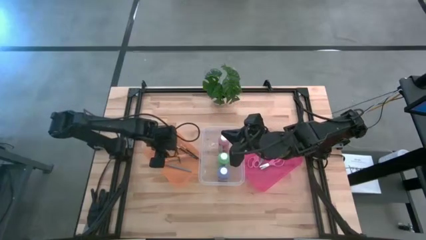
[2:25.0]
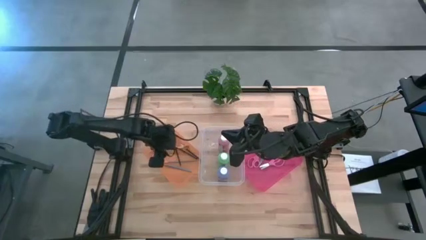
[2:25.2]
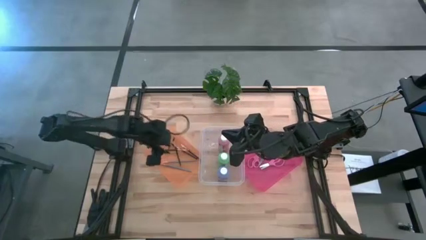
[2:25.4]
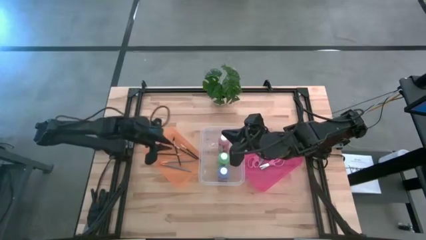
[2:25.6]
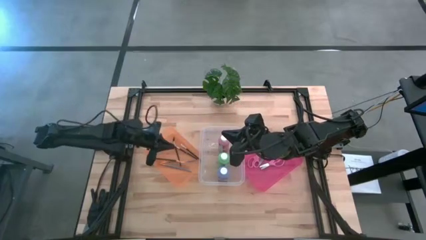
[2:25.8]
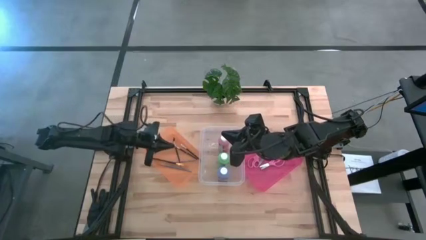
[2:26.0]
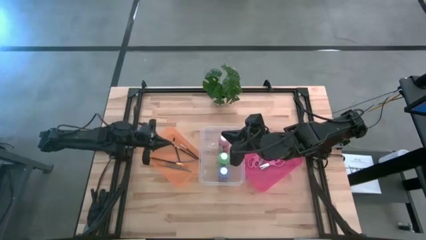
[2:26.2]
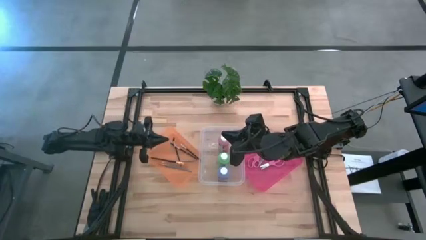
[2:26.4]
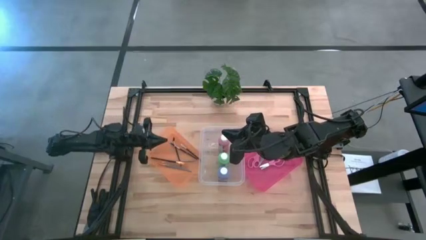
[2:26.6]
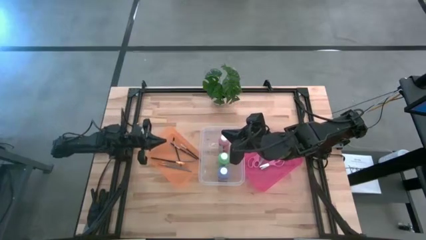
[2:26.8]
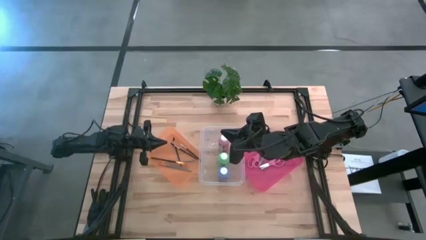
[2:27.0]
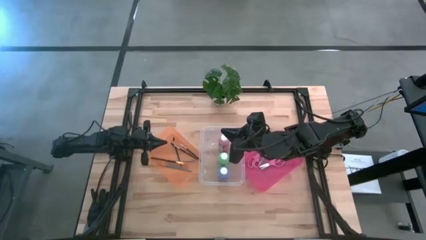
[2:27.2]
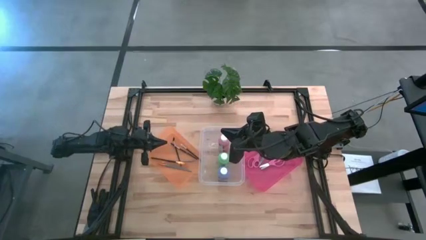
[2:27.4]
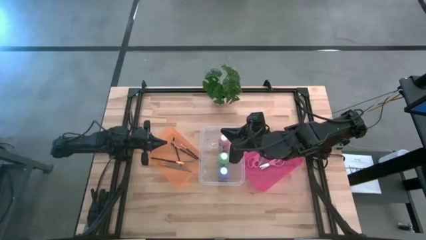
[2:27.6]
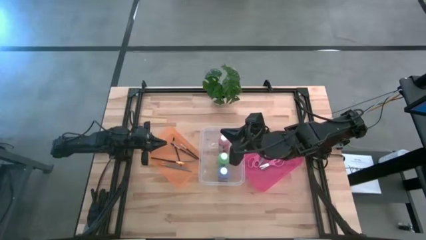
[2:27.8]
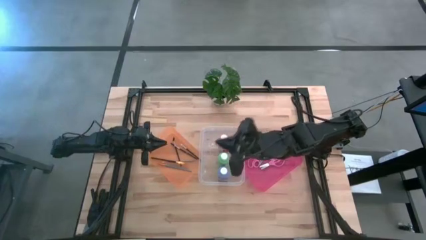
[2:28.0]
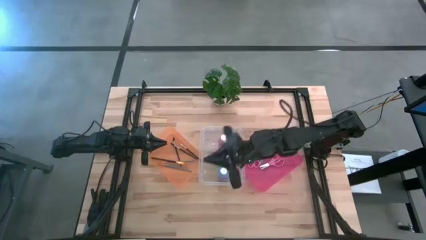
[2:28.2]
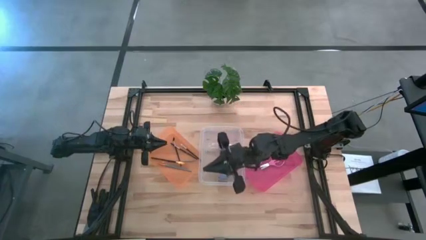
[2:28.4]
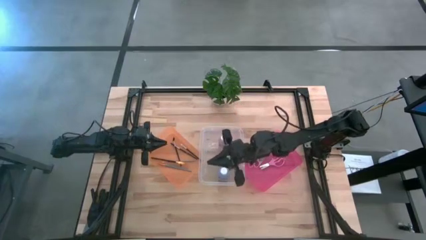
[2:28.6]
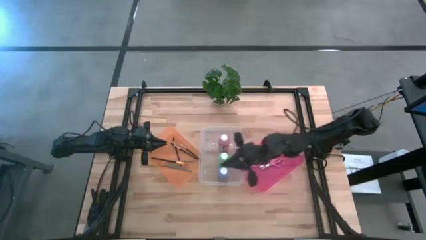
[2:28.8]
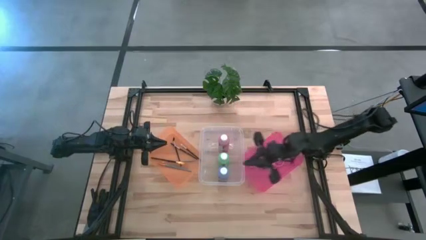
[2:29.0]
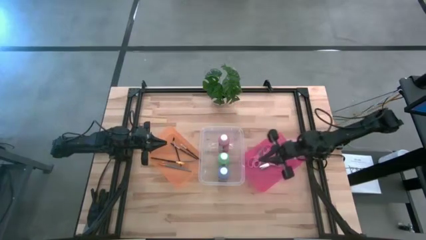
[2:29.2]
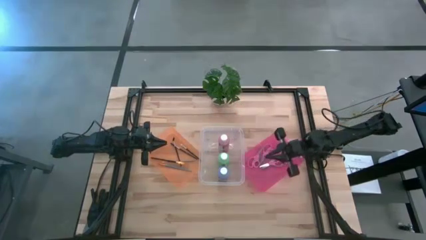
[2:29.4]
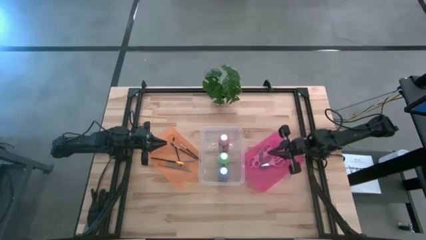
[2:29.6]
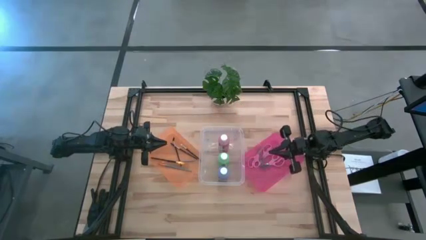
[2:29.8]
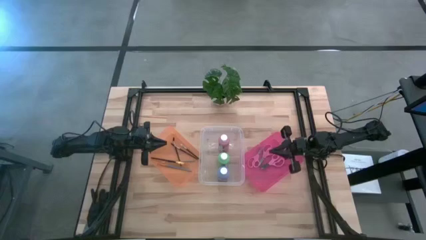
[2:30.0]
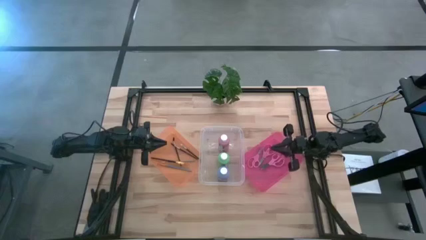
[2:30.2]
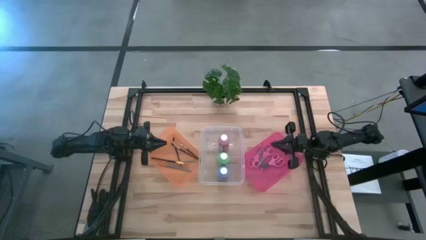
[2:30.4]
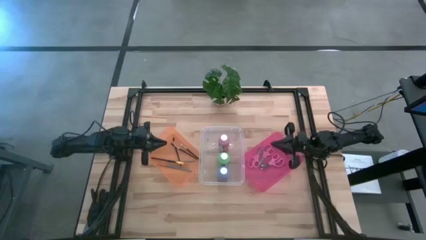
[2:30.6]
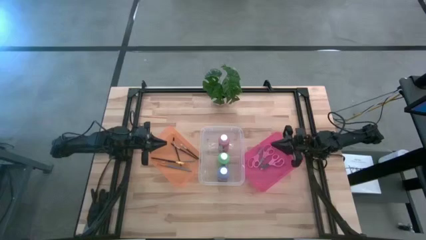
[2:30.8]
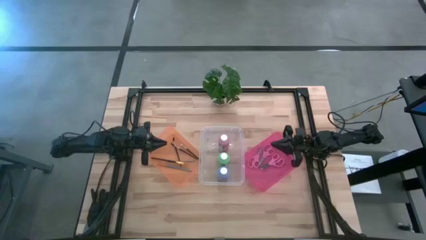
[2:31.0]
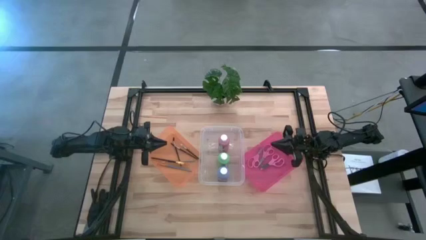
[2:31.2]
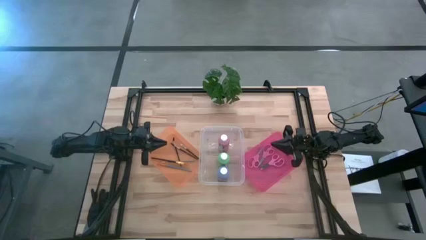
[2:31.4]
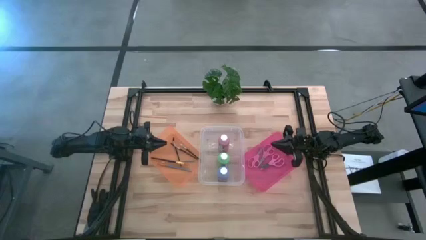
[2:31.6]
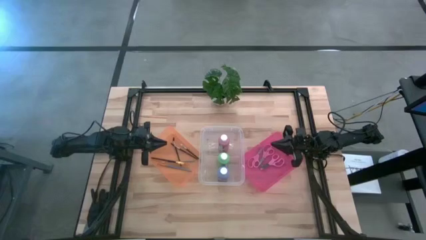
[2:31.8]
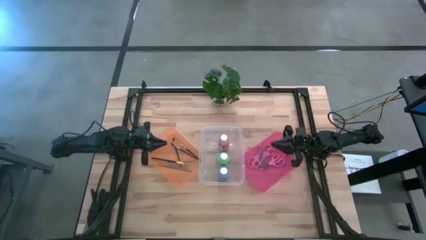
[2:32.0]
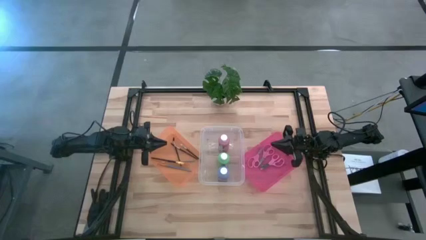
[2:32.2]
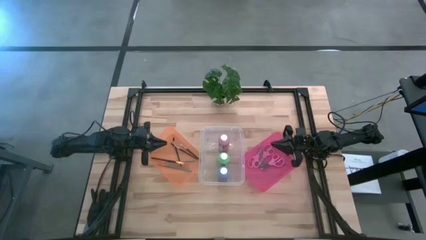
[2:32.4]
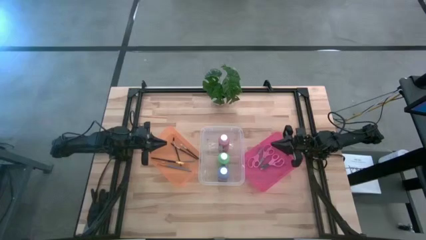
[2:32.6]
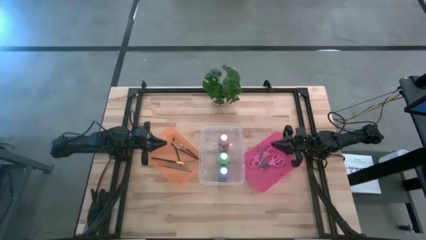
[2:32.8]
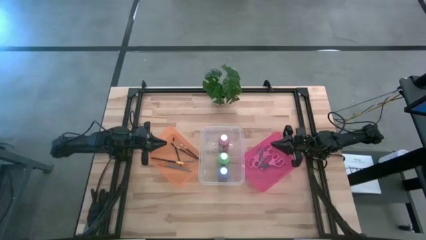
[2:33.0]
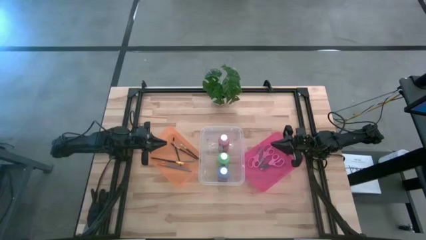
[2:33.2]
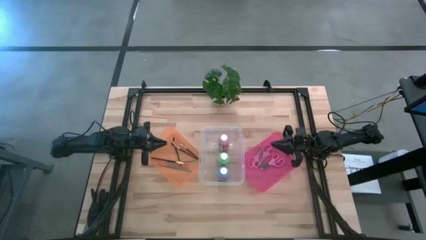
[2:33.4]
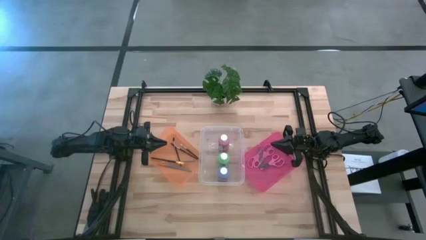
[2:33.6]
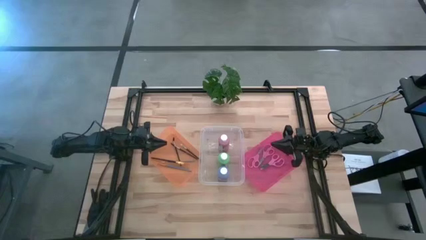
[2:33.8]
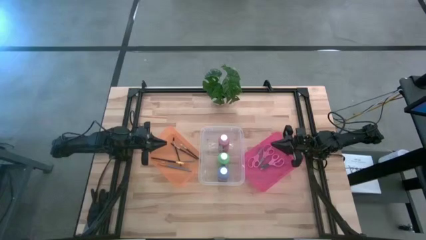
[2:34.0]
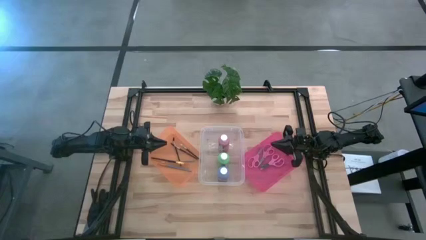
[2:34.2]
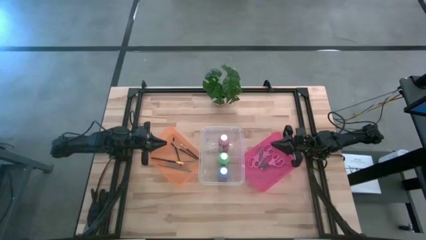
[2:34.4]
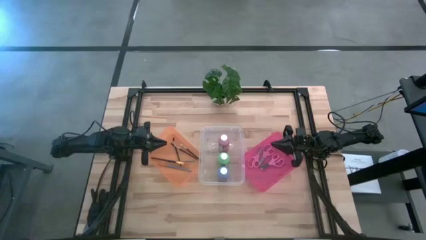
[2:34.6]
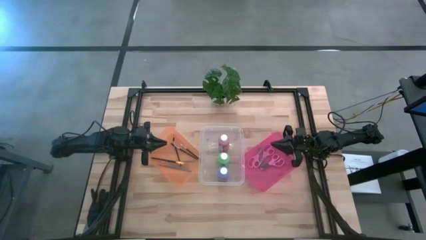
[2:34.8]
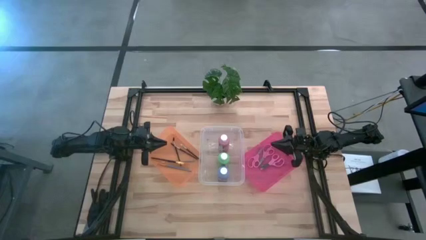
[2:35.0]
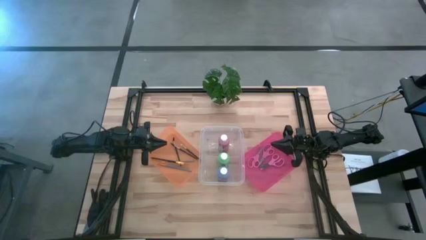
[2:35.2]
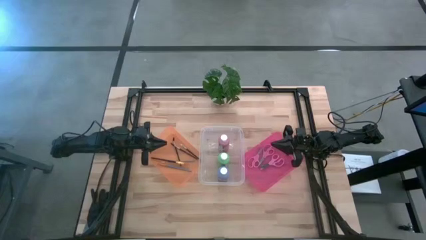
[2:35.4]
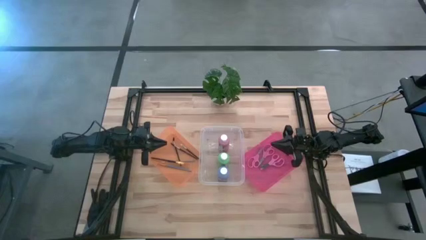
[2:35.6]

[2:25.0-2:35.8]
Task: Pick & Place Paint Supplies
Return to Home Position

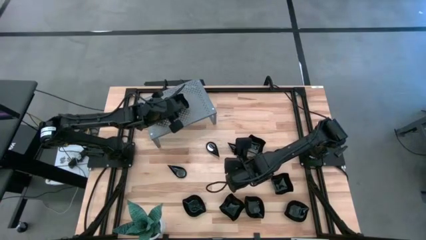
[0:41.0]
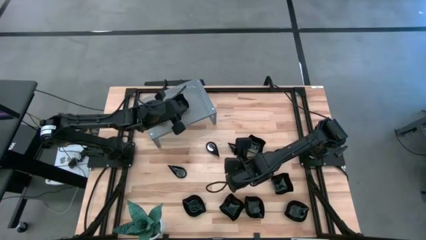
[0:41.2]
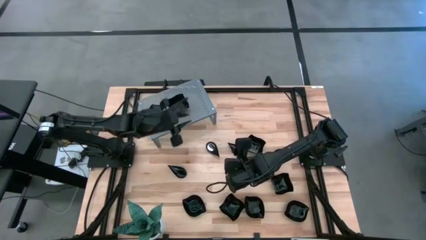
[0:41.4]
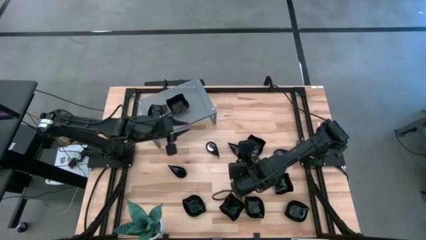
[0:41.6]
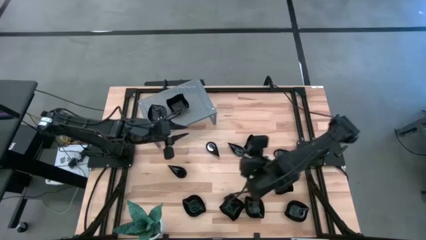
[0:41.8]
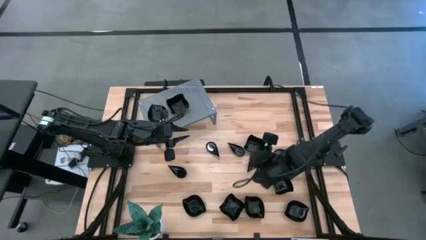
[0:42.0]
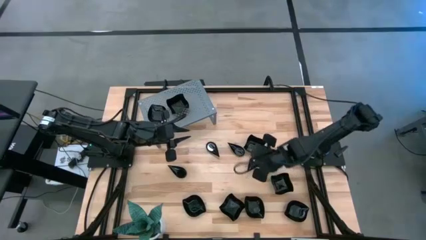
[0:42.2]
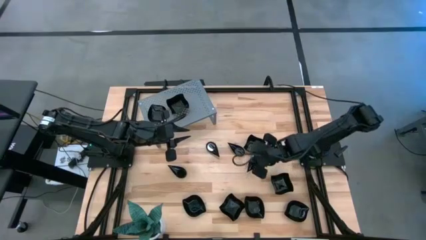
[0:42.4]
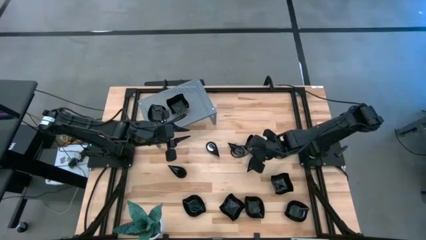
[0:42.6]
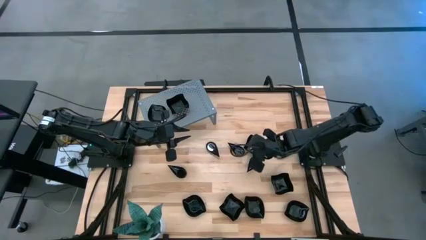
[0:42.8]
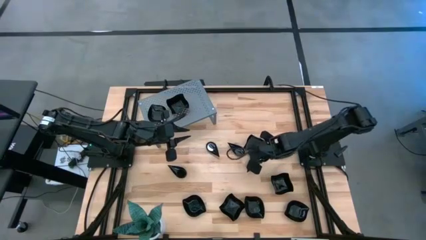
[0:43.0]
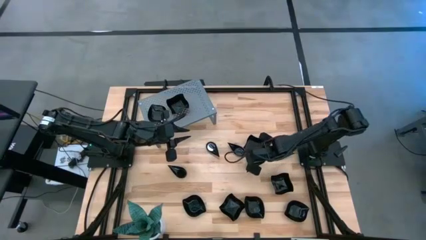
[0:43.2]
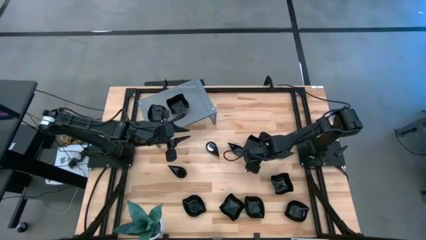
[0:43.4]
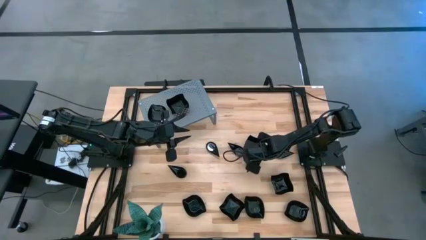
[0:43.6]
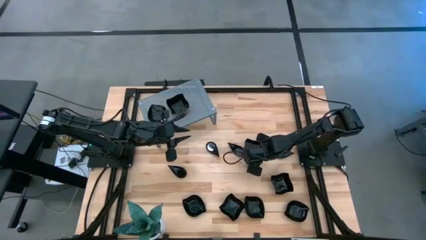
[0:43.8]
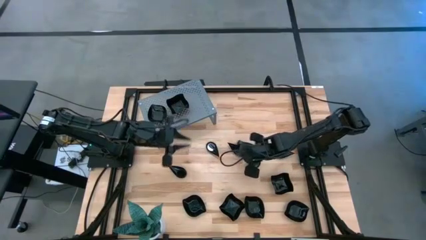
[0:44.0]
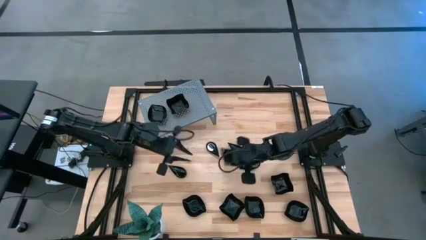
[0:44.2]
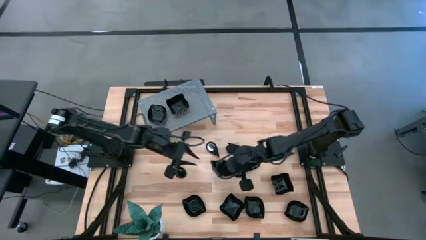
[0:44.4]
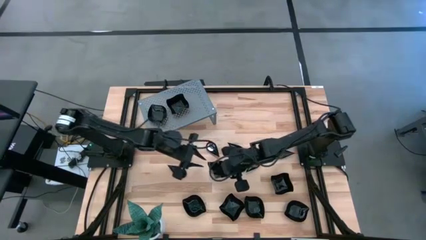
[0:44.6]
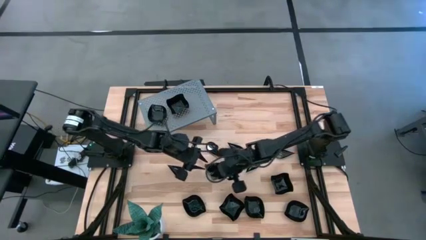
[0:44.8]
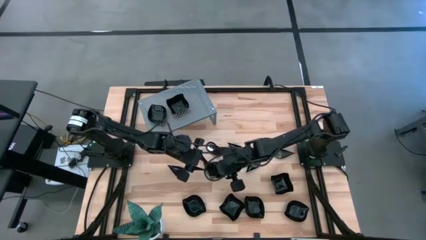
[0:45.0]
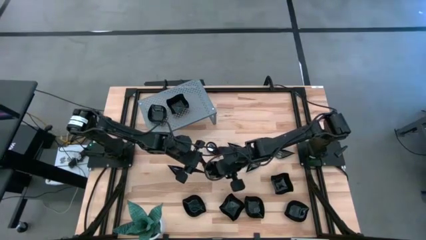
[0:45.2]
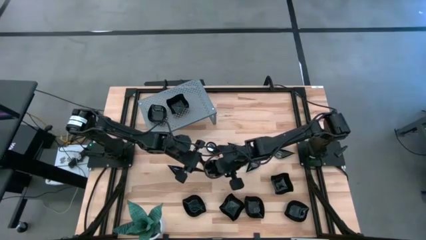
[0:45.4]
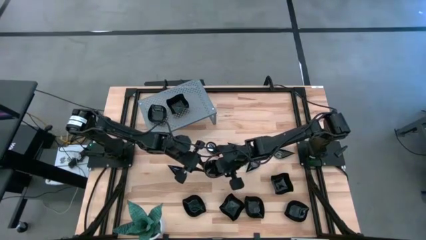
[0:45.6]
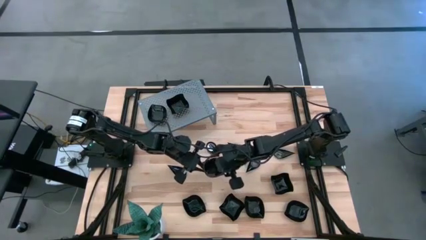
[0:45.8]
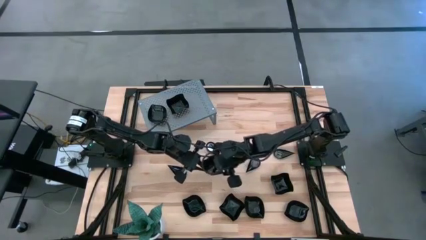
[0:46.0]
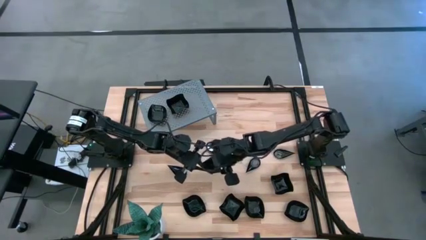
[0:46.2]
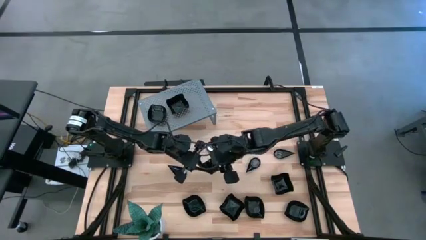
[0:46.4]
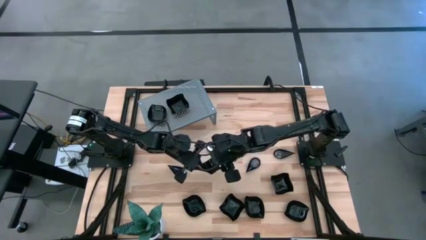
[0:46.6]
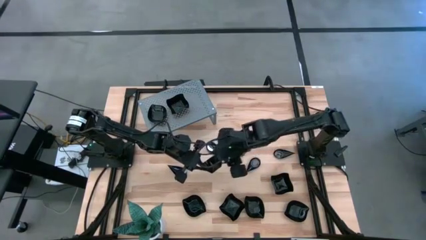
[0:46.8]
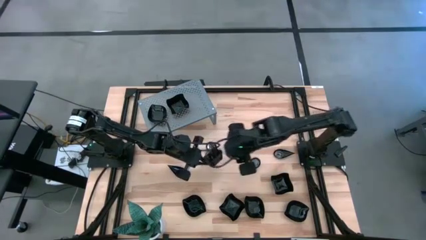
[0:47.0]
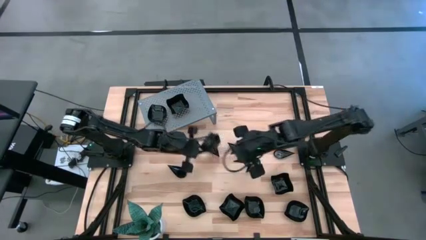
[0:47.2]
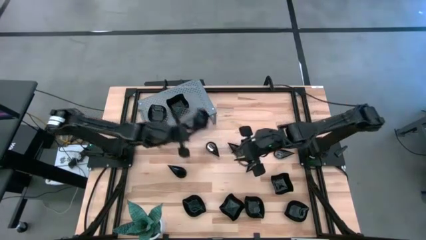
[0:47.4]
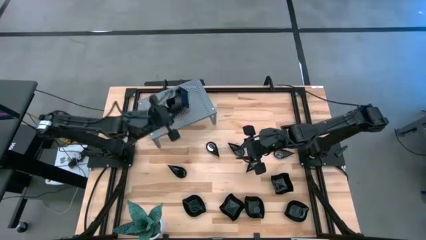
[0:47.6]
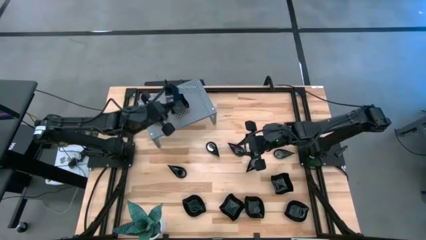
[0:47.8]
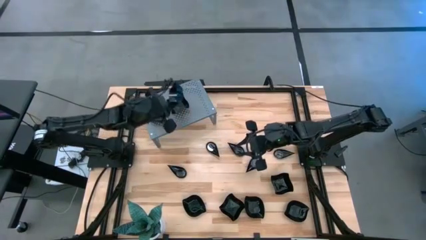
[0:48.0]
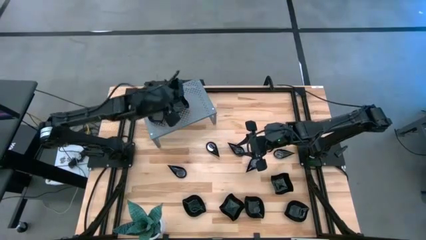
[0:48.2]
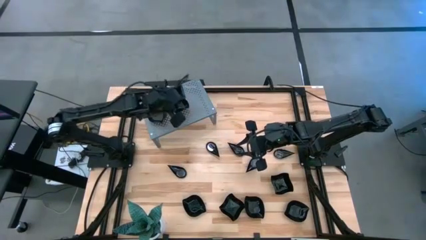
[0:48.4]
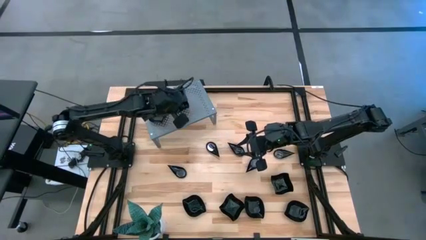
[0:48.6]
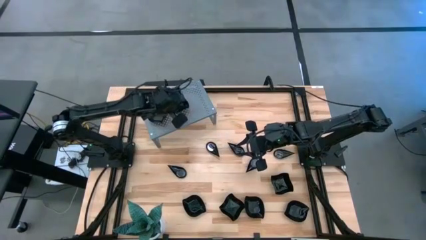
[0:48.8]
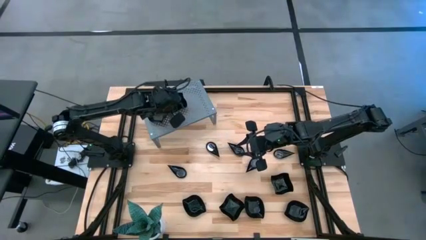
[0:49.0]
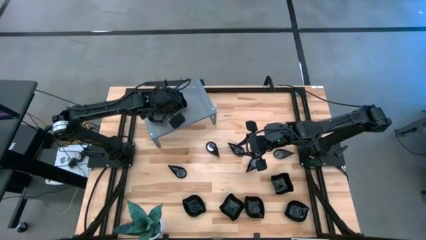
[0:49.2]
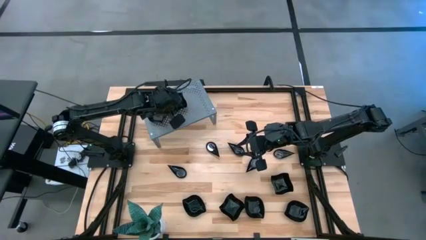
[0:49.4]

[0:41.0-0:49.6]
Task: Pick & Place Mini shaped plates
Stack the black distorted square plate on top of the black distorted square plate on the shelf
